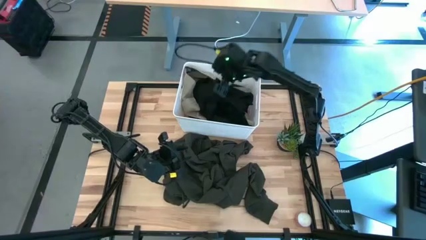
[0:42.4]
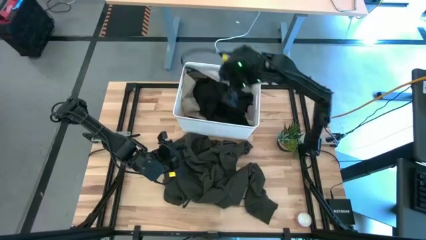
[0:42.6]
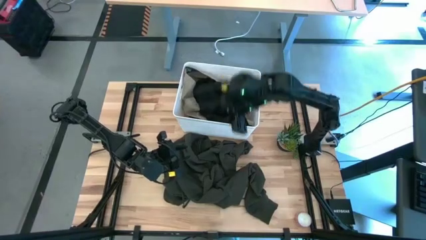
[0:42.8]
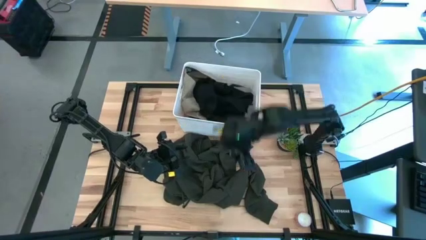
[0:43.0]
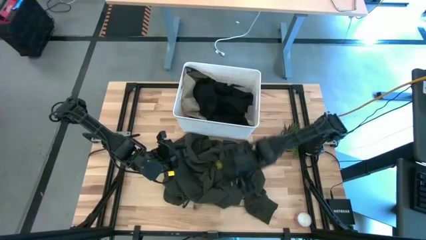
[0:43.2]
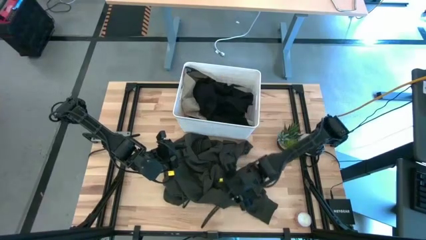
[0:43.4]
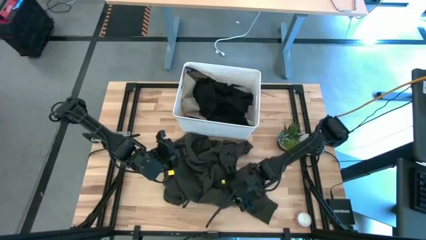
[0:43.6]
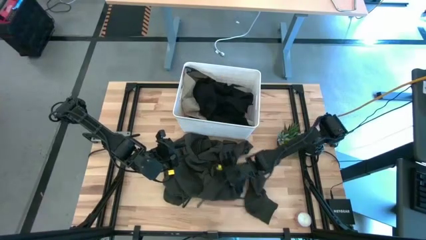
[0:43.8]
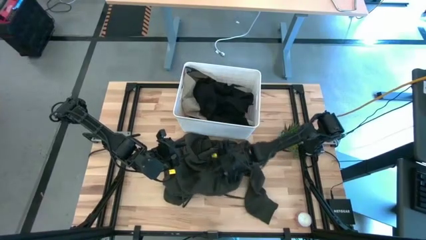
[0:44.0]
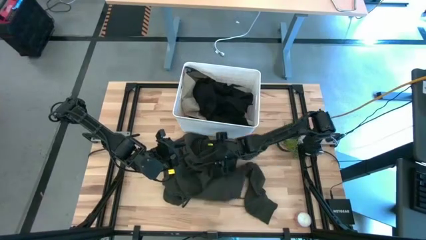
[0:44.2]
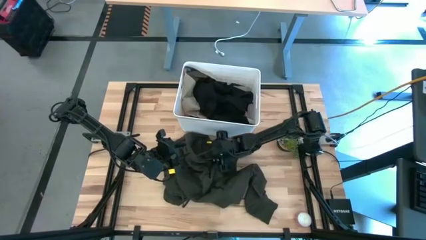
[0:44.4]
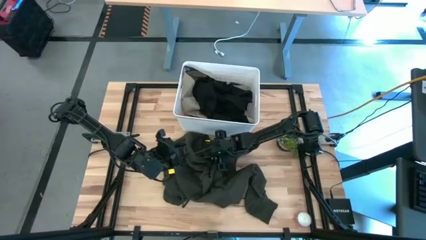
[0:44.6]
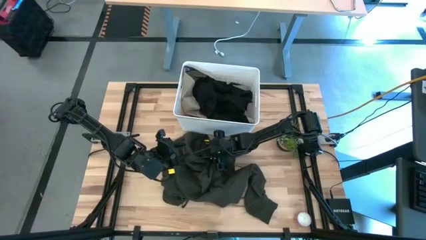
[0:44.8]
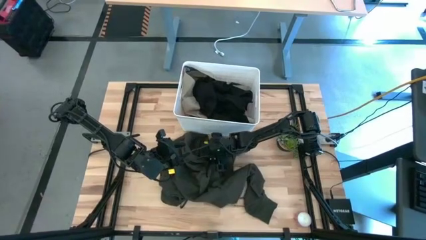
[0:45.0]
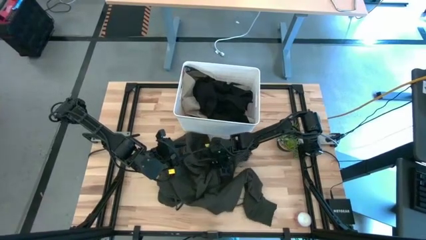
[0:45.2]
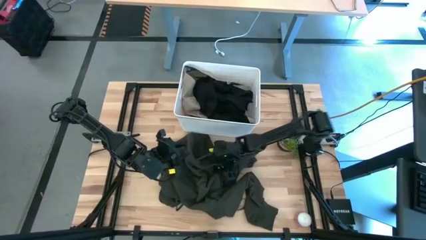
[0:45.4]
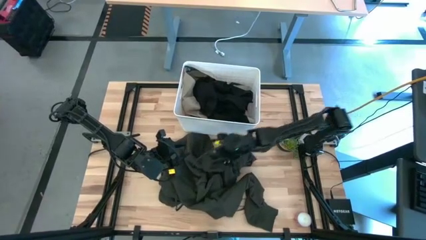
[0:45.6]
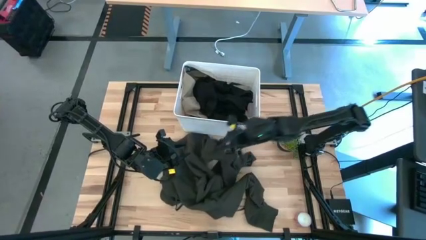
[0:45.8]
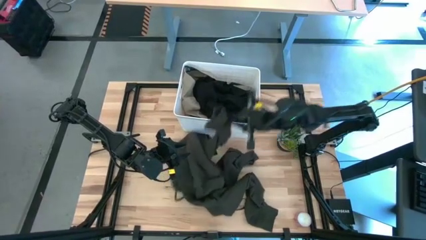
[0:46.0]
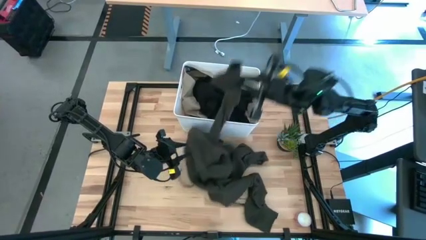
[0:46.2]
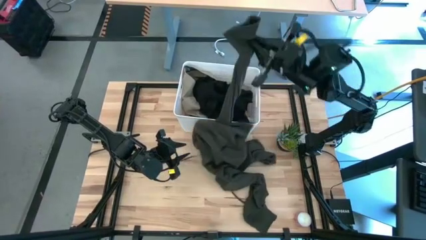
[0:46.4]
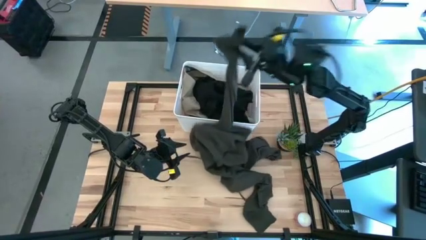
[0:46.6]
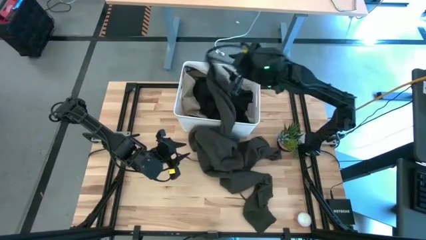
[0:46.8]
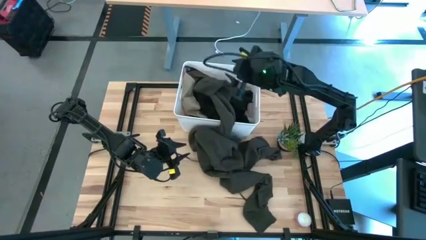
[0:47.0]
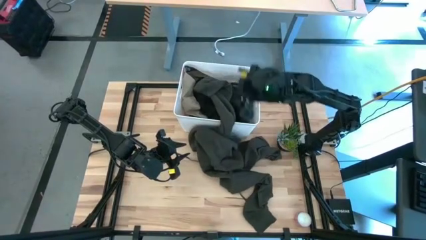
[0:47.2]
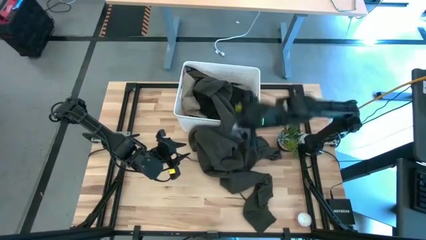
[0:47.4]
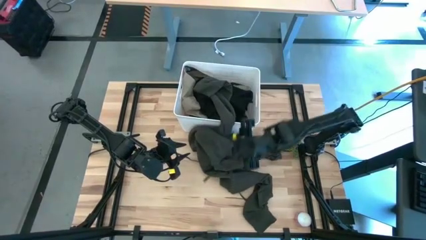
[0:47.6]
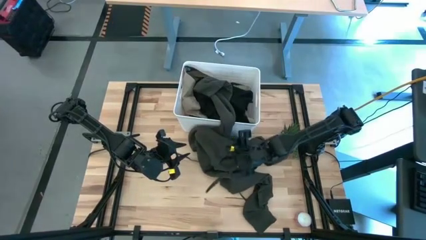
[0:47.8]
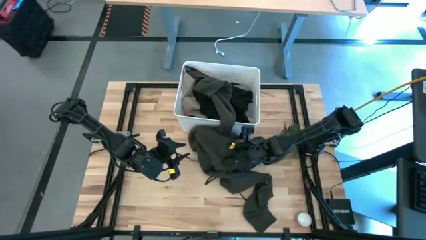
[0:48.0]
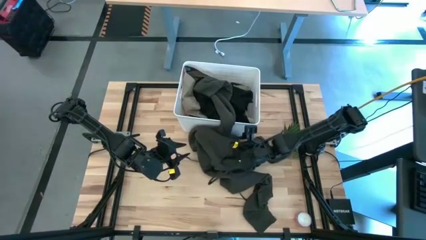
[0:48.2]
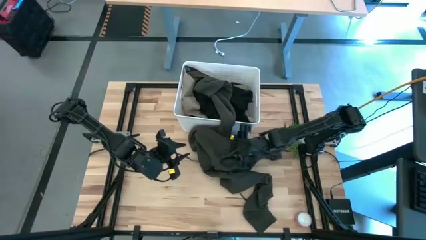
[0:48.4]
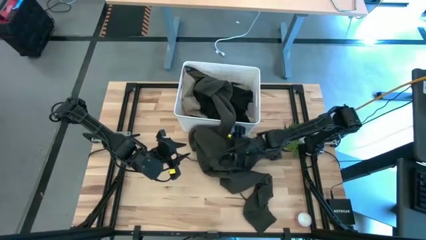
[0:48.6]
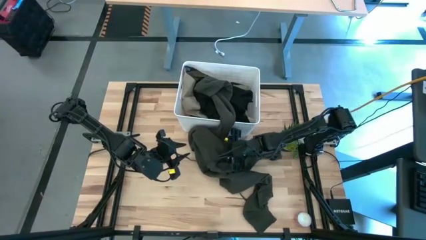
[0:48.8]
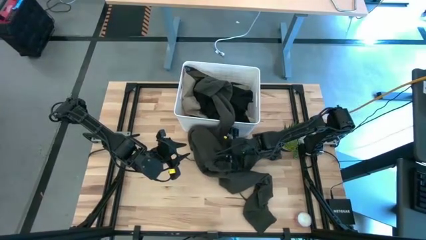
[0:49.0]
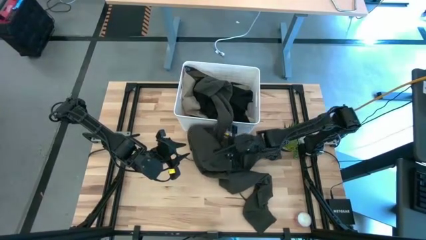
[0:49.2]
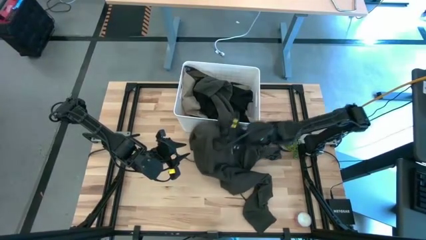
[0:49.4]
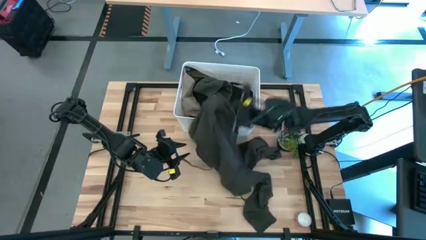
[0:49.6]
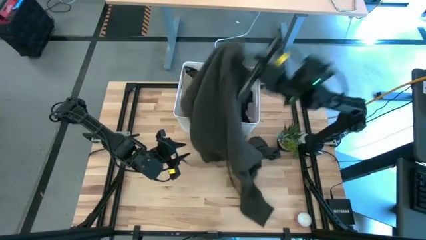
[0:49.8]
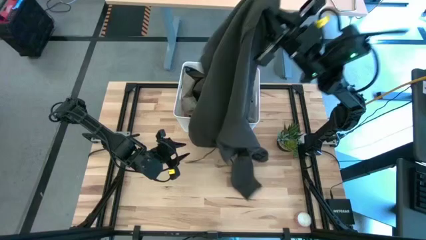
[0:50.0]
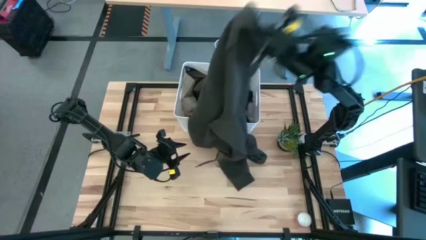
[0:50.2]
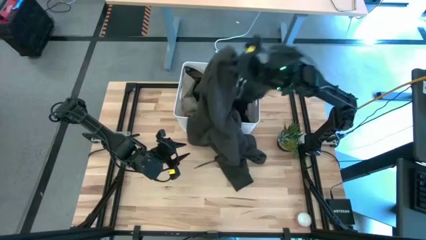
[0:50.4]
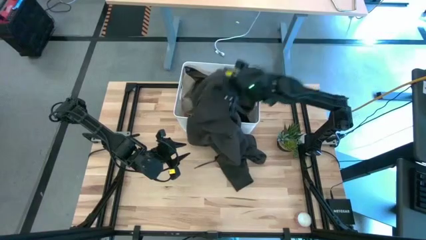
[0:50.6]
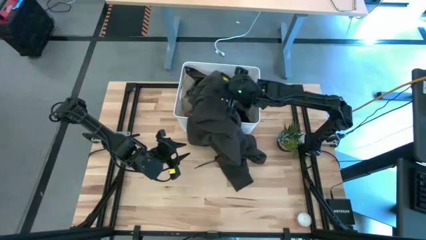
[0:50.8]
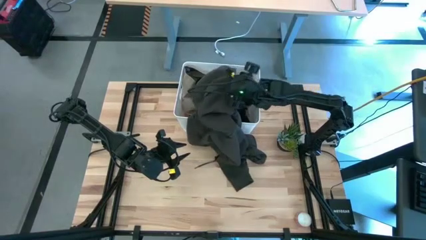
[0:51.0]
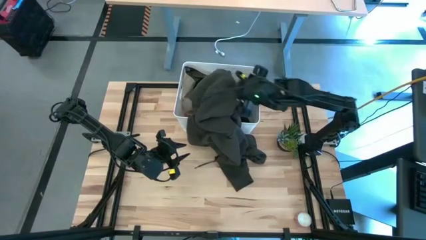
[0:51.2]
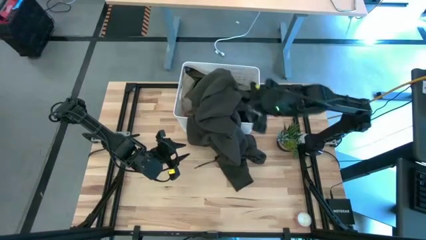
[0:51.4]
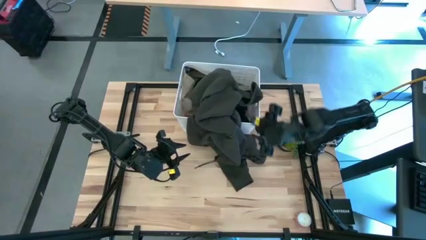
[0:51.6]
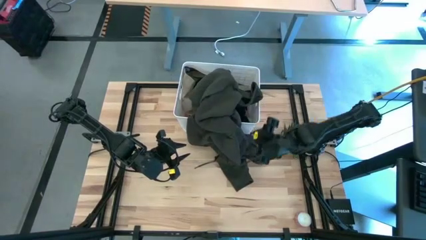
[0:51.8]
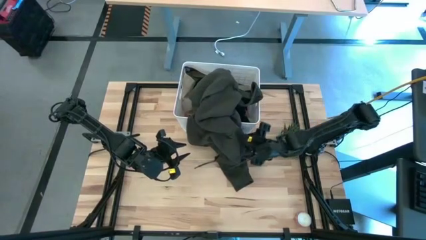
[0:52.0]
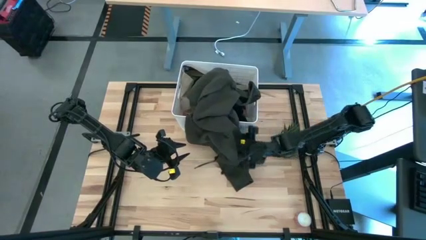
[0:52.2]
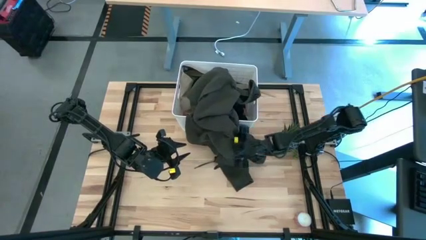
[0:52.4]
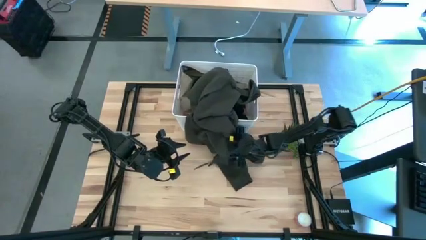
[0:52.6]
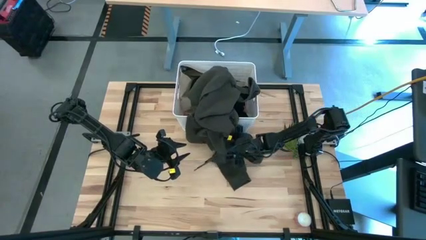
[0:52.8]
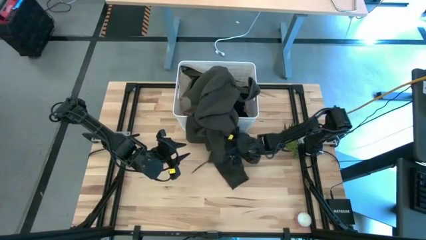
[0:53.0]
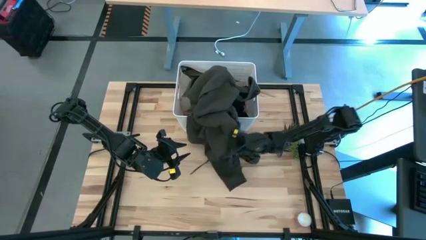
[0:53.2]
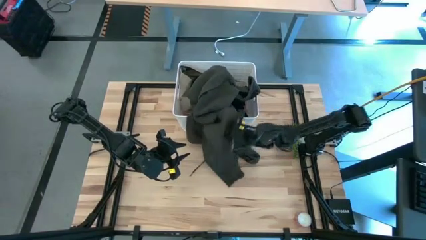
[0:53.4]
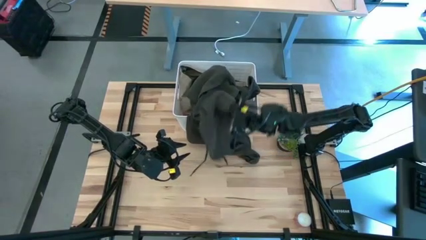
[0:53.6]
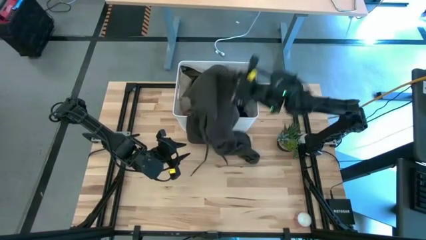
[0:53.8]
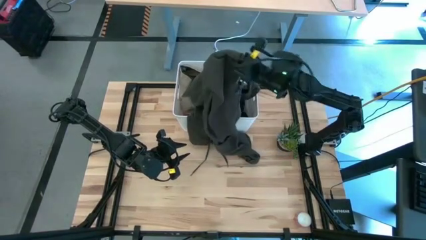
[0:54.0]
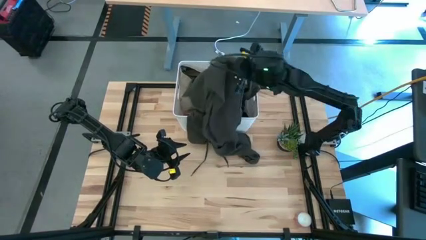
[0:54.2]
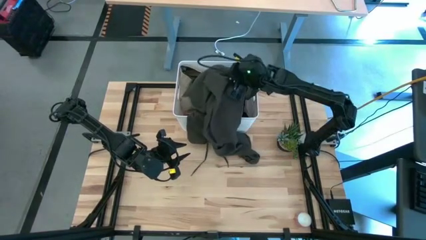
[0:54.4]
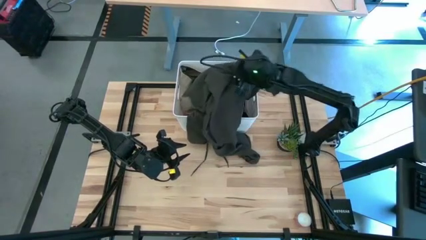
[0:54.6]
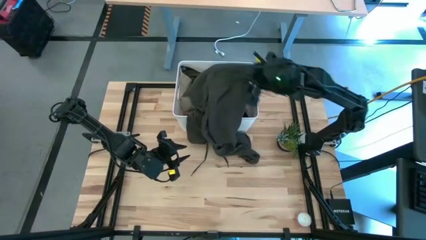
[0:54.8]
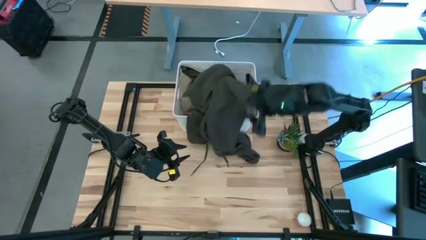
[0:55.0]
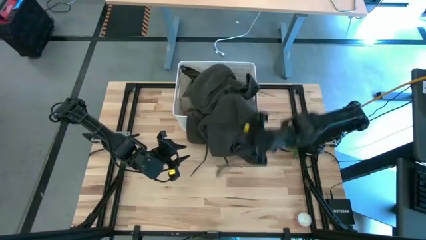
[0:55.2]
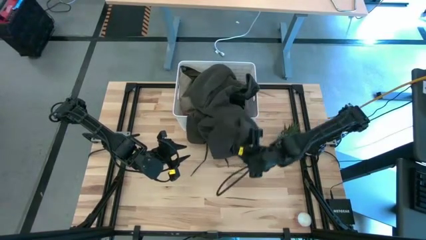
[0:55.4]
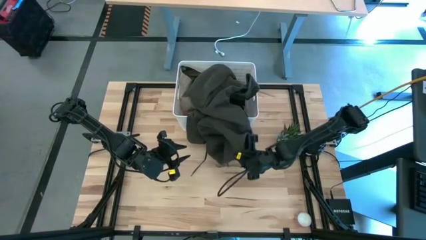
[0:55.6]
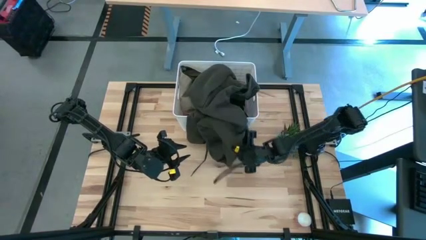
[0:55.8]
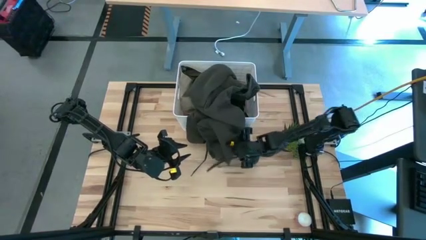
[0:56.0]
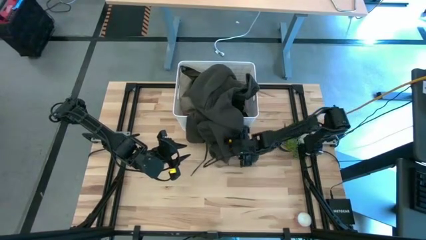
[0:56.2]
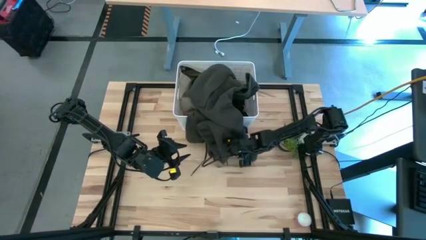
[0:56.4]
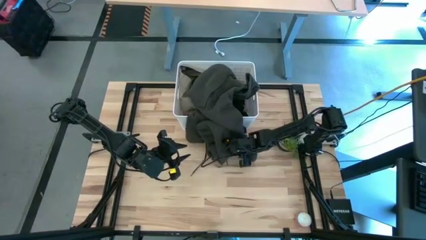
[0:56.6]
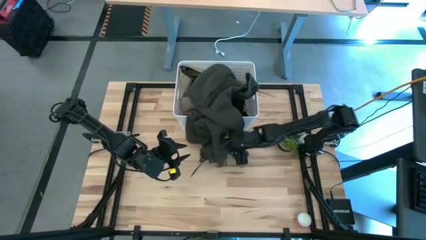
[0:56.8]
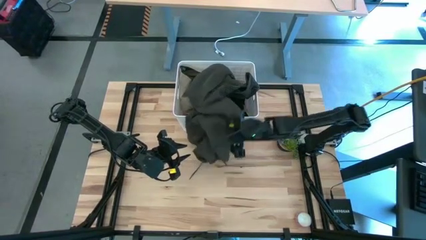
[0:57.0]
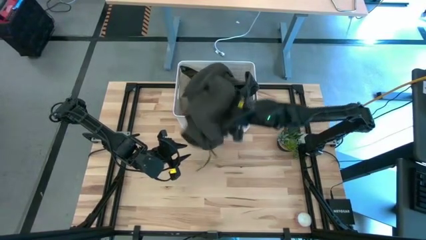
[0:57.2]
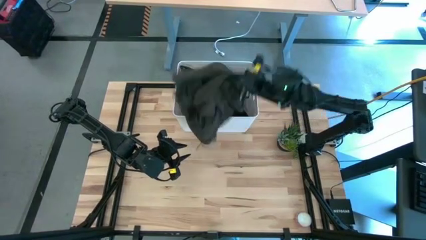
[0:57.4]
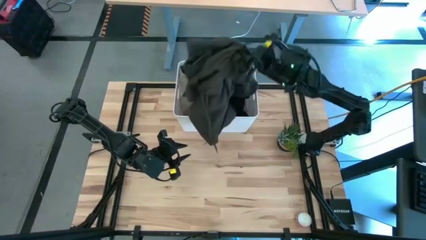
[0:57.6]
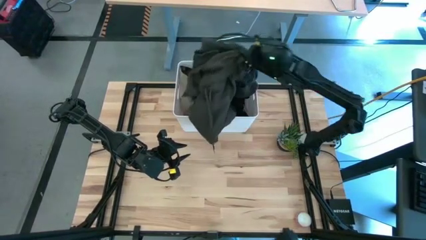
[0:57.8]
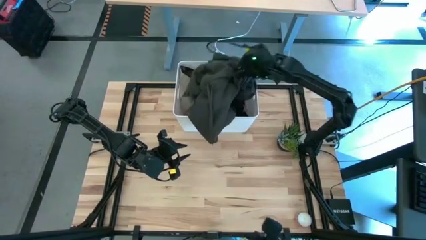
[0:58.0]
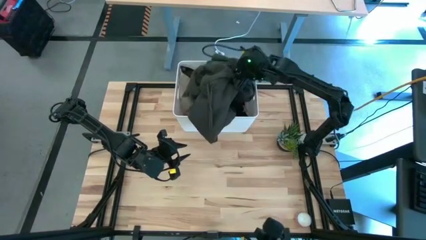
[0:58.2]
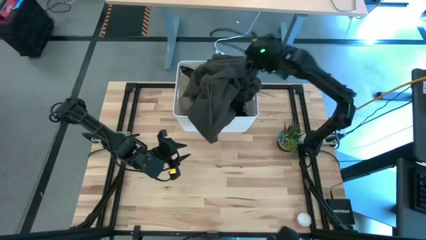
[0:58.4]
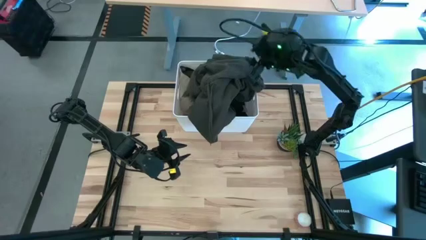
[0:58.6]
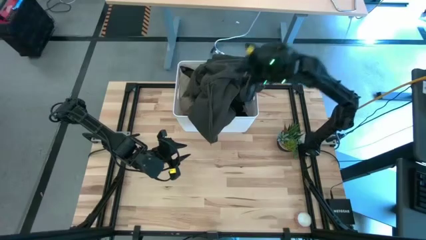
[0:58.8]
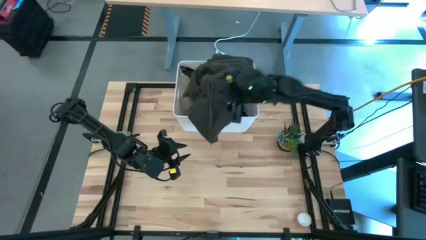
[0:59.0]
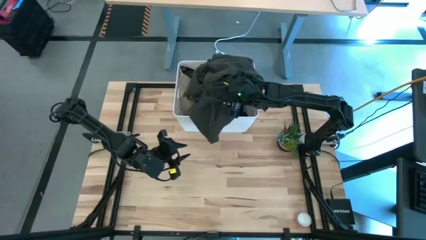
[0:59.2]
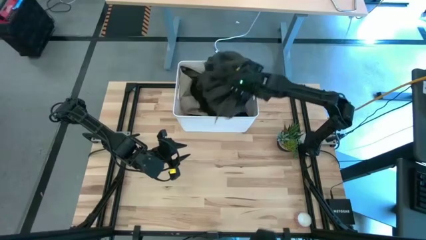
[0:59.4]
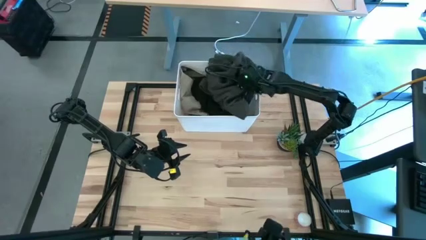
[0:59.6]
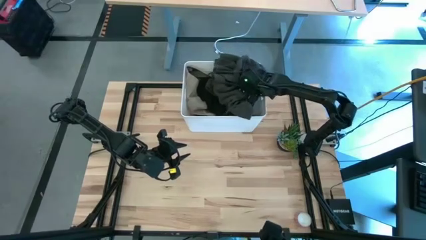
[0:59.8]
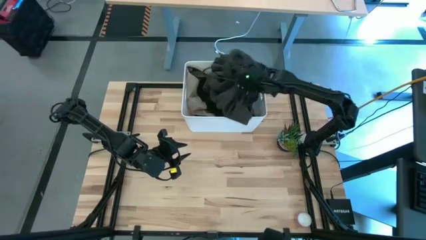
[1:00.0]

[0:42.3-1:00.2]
Task: Sort clothes
Put the black jacket into the white laundry bin
